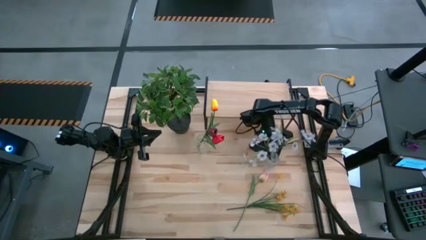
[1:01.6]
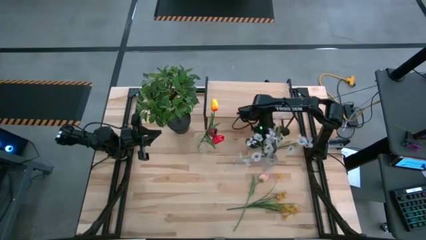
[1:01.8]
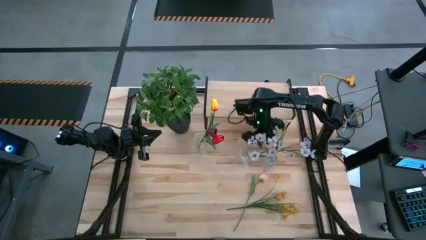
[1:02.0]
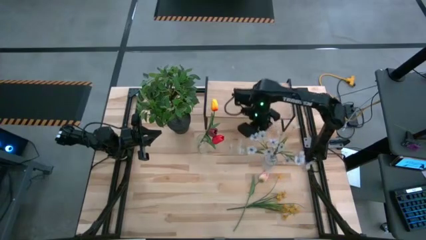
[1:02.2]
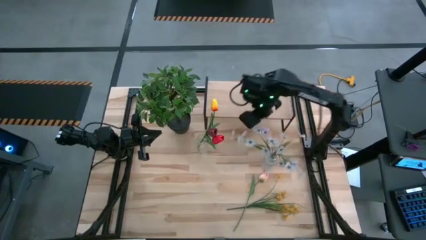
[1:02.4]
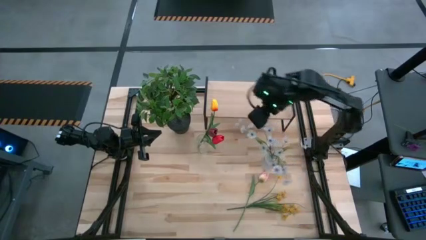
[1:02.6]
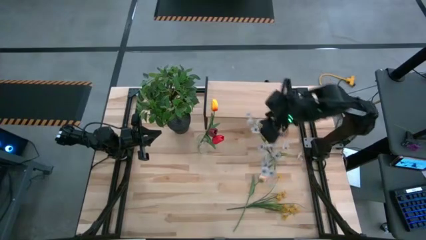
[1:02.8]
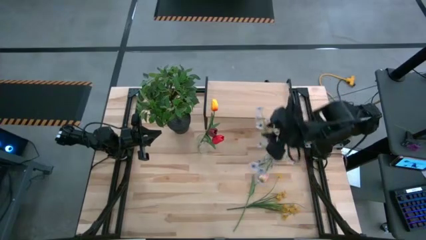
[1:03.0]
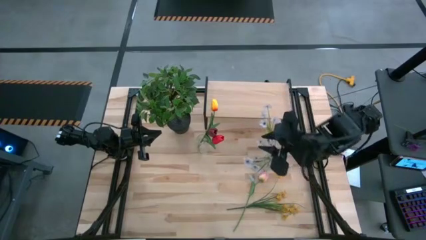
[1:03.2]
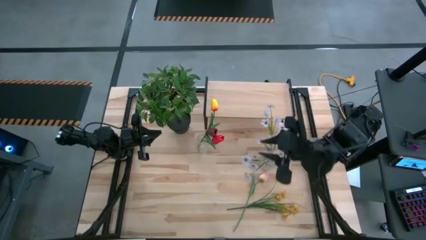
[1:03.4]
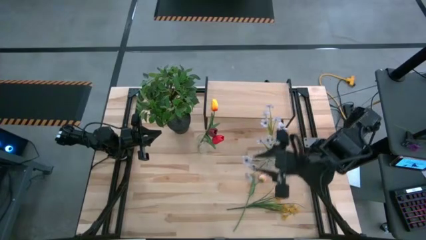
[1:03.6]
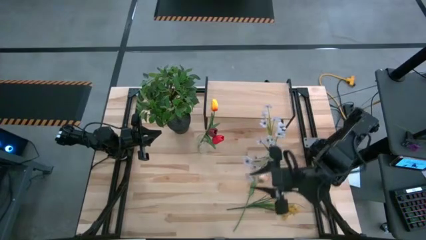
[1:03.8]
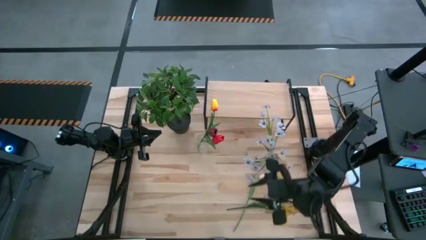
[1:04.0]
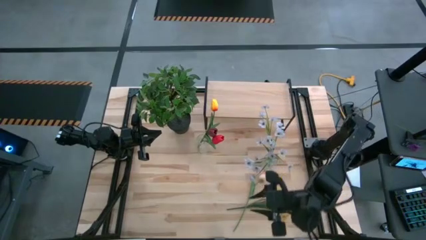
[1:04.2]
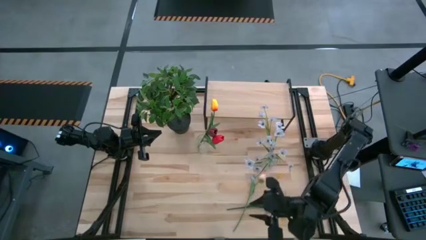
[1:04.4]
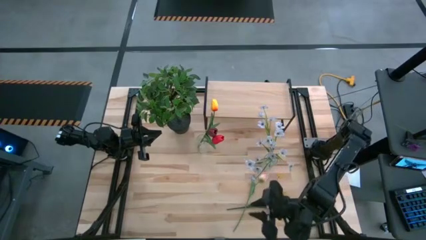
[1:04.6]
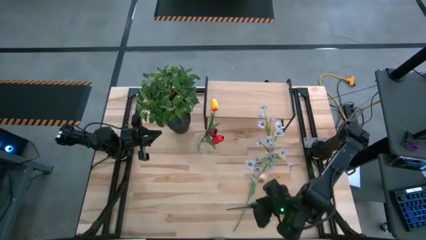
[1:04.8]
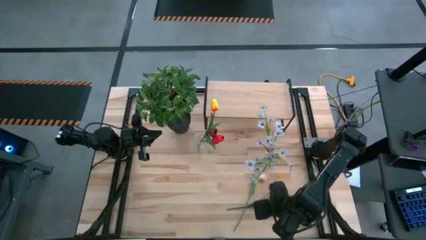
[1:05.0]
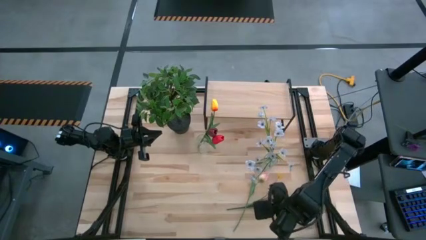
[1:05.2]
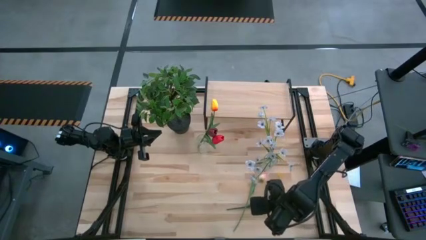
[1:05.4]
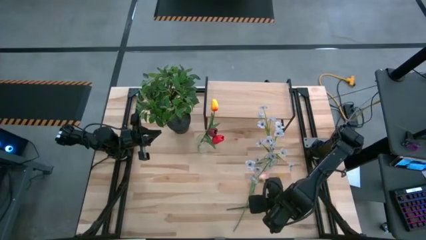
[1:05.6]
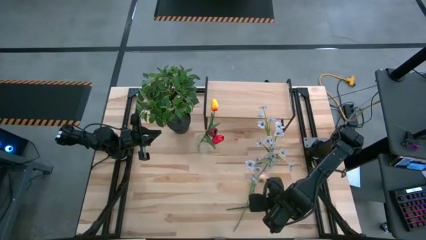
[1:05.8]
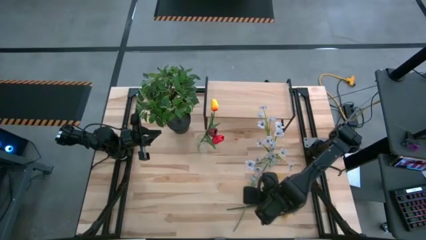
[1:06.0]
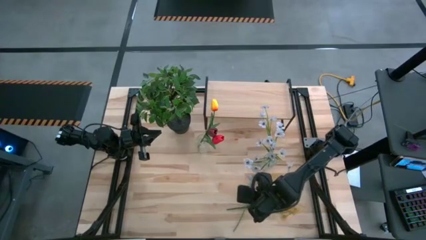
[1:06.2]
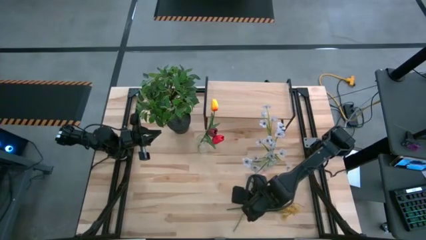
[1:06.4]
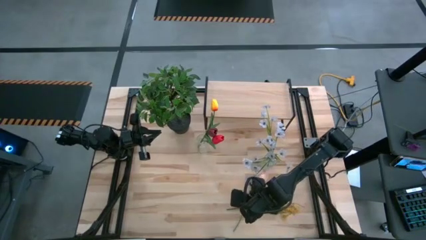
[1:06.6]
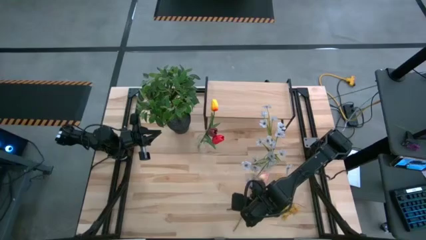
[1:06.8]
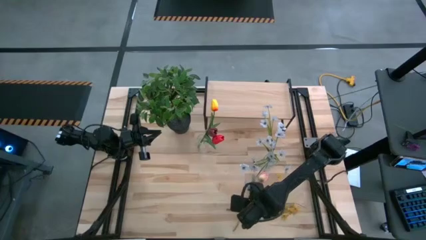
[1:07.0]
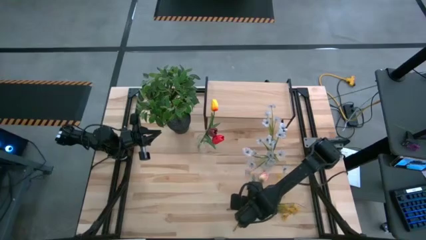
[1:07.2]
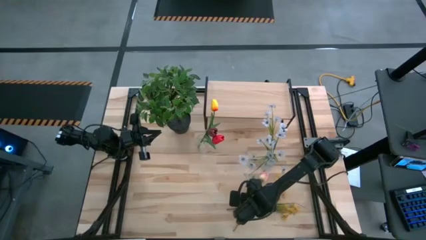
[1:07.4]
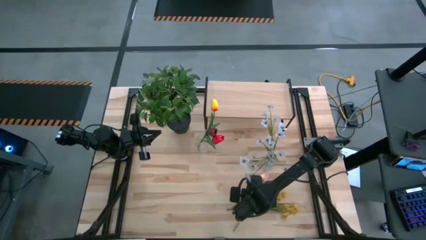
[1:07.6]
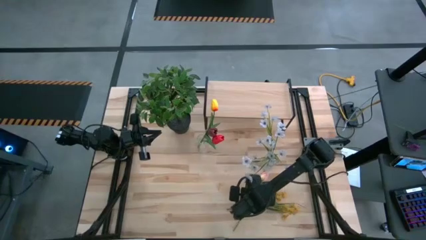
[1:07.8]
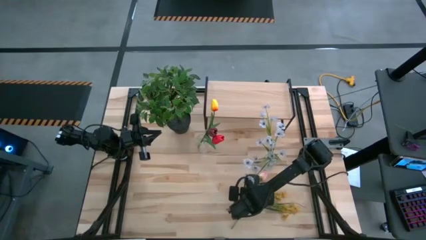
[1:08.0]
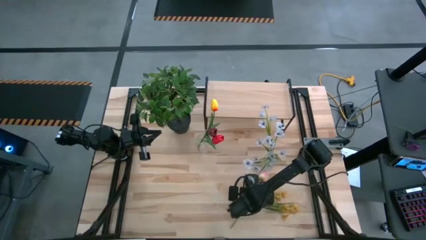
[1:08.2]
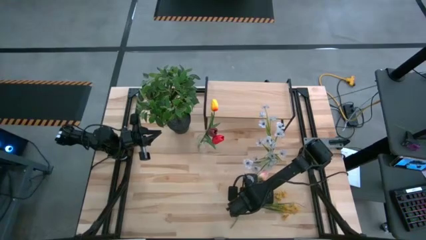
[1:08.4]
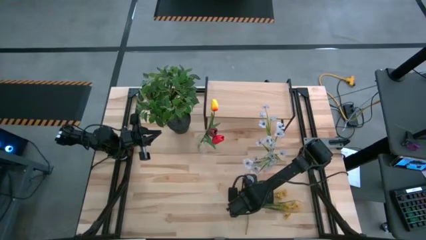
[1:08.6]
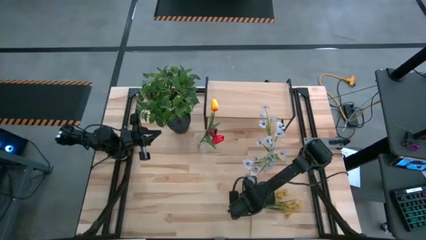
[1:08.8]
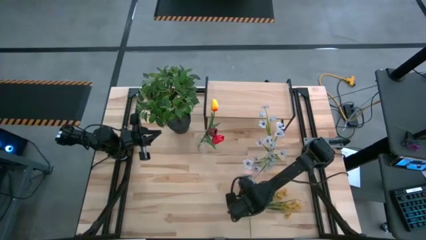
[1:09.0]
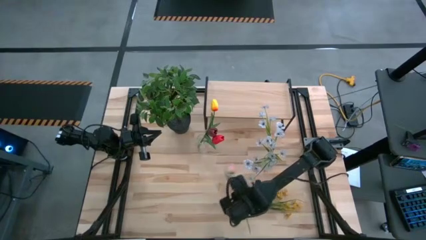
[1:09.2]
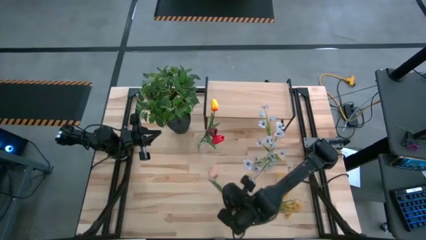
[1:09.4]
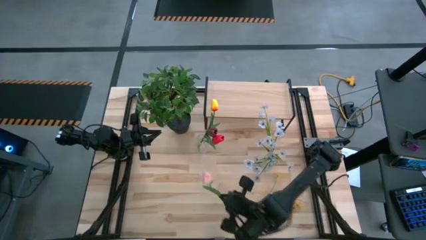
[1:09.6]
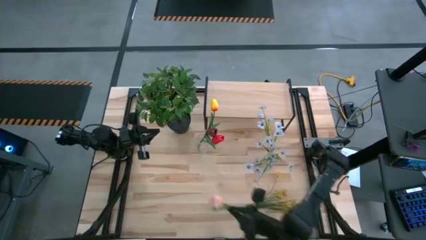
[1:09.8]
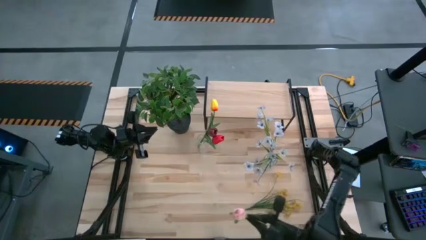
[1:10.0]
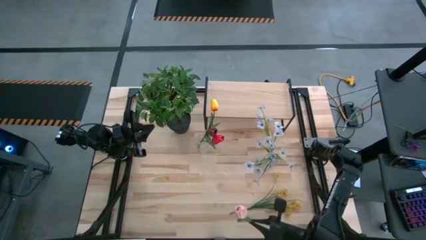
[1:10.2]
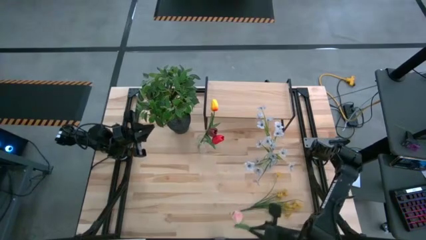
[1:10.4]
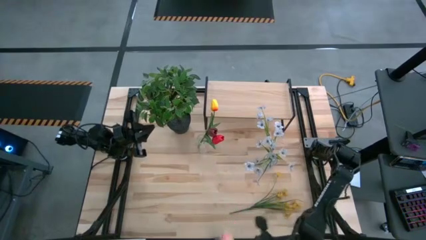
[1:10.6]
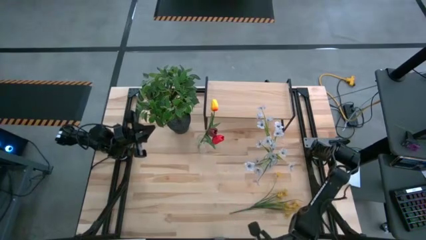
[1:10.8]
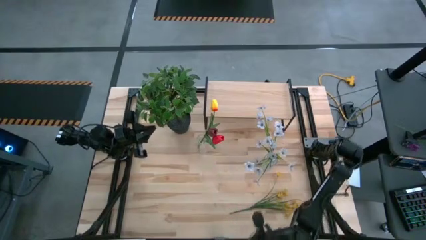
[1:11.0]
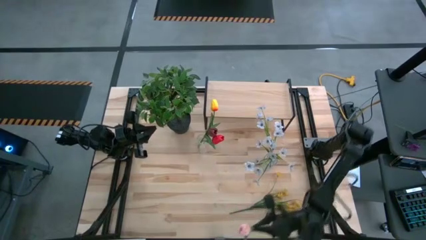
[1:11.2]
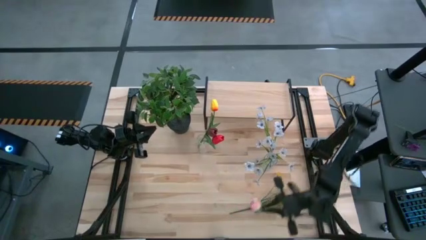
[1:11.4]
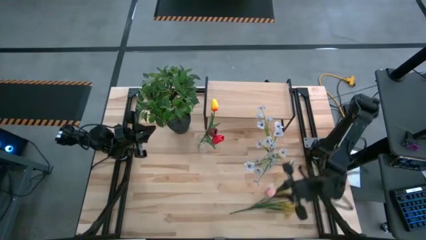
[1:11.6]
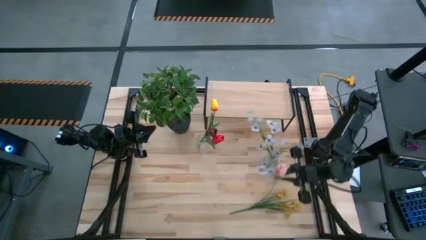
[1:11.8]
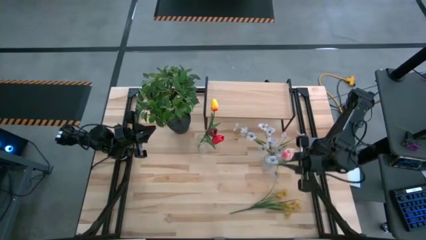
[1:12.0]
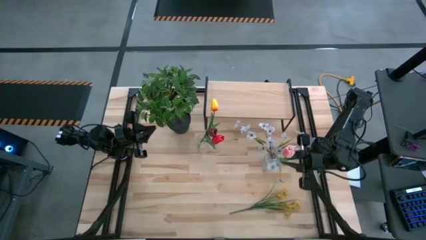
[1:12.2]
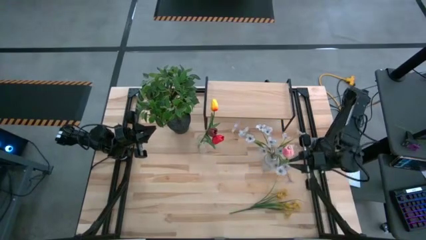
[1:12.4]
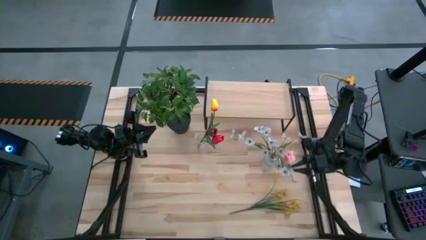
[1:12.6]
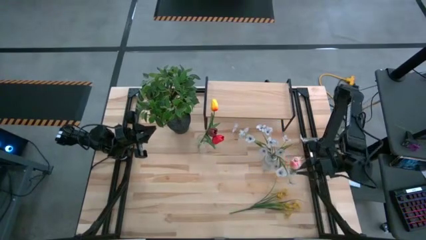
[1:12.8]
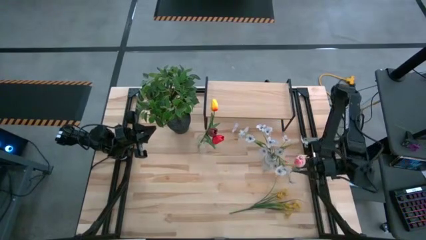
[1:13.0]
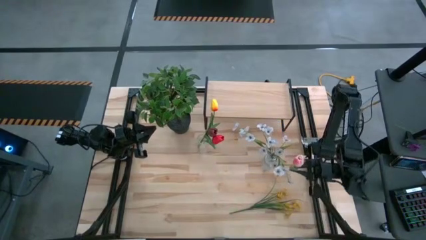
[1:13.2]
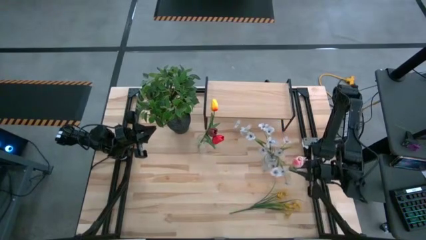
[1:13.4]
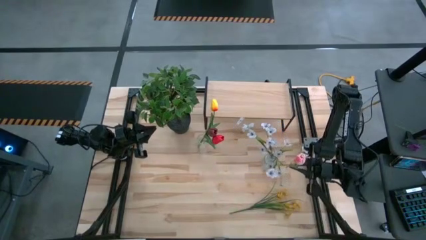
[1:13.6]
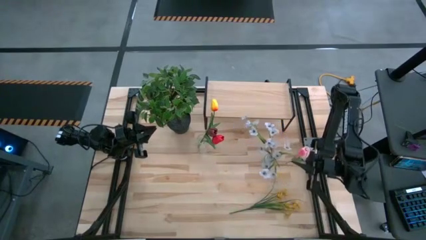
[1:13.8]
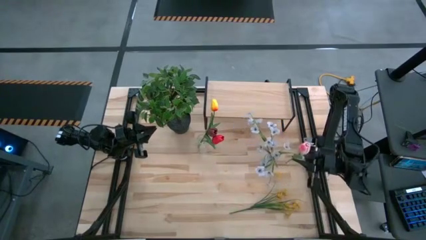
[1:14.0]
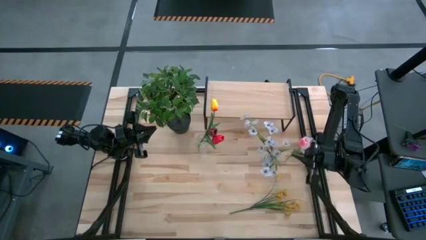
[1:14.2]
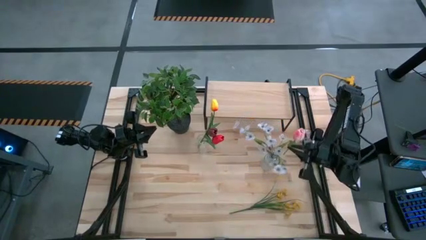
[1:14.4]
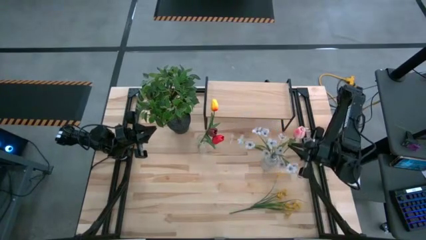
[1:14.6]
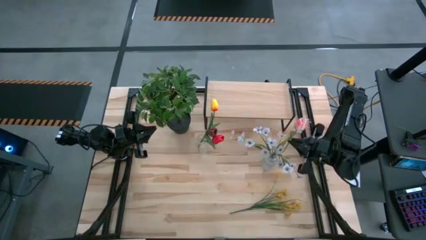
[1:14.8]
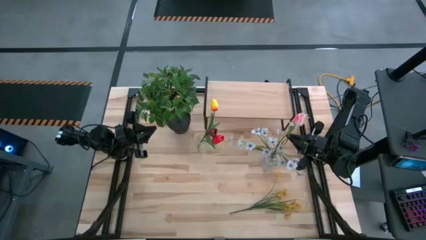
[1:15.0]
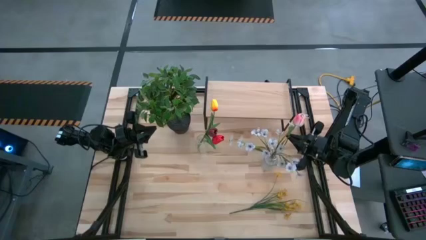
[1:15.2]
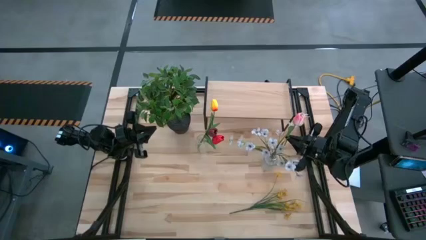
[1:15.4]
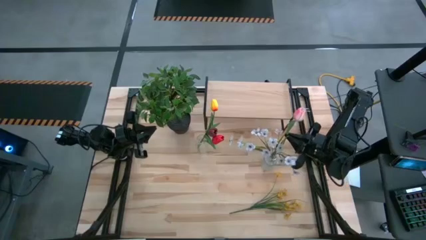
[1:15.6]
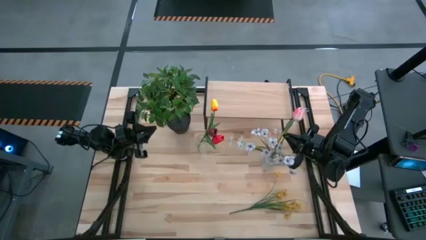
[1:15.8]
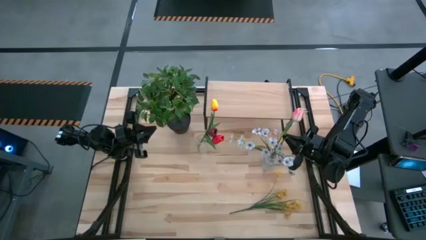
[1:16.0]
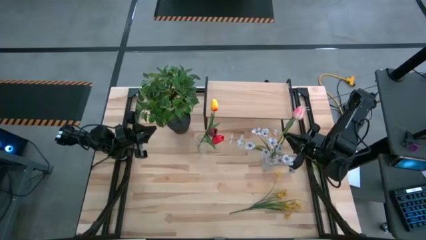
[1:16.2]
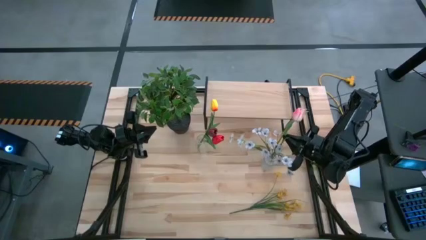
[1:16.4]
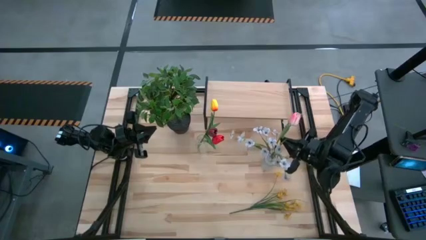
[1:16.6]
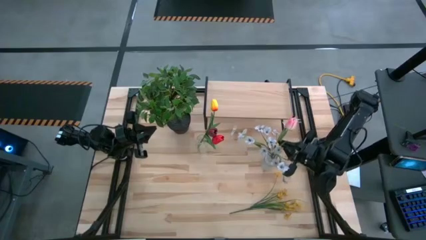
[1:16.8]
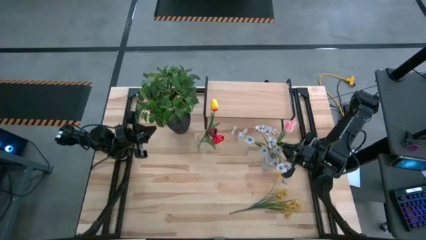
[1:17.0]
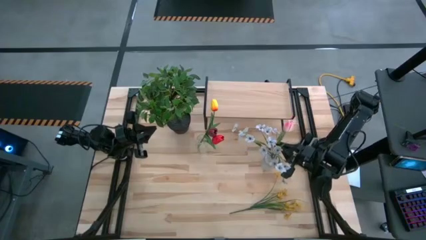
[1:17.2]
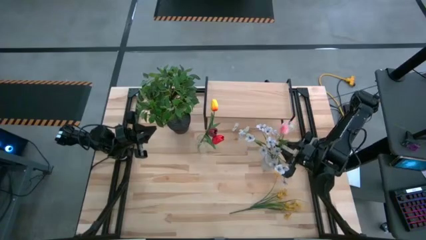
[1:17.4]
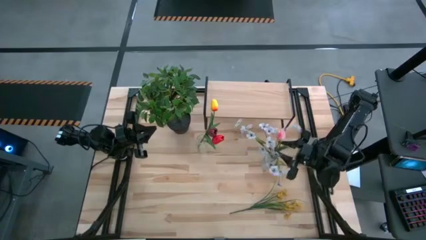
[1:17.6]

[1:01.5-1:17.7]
Task: Pick and place flowers into a vace then onto a shelf
Put the pink flower into the right transparent vase
